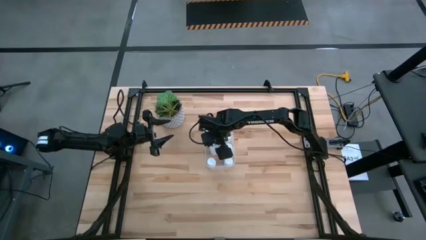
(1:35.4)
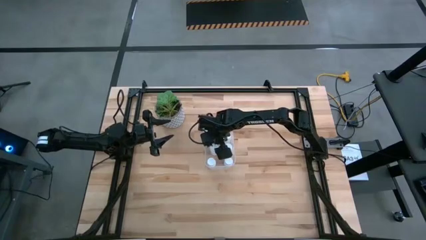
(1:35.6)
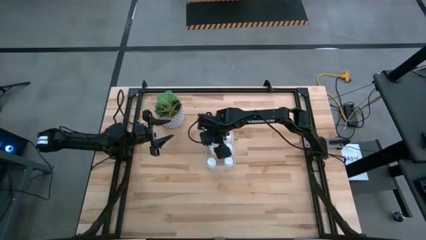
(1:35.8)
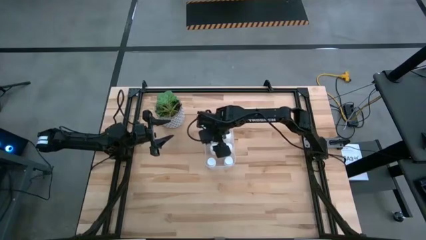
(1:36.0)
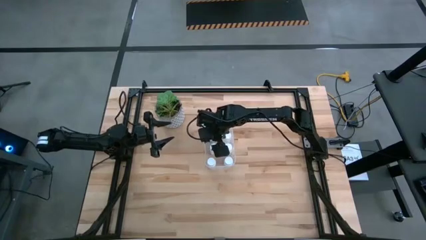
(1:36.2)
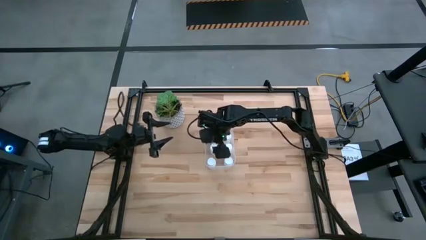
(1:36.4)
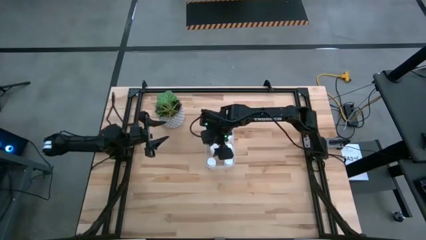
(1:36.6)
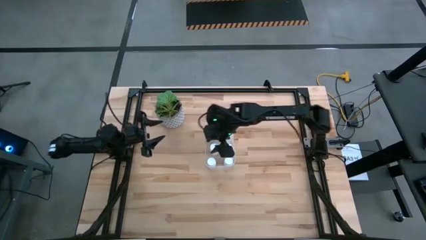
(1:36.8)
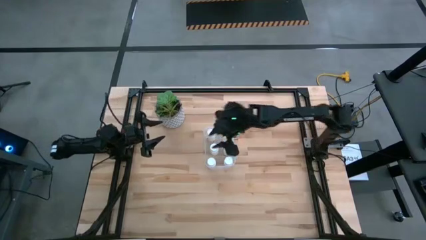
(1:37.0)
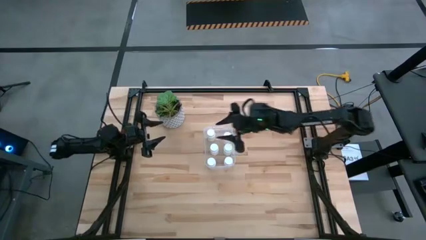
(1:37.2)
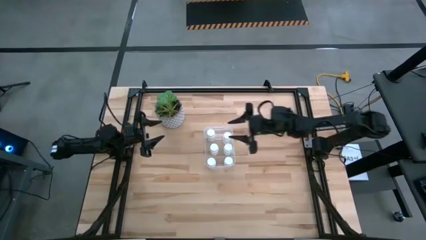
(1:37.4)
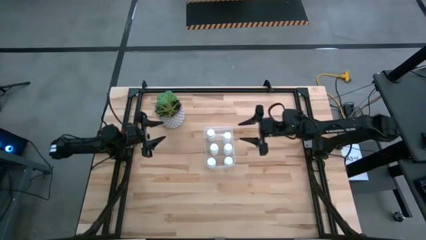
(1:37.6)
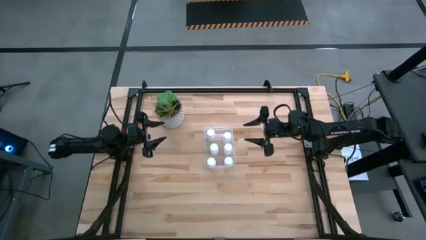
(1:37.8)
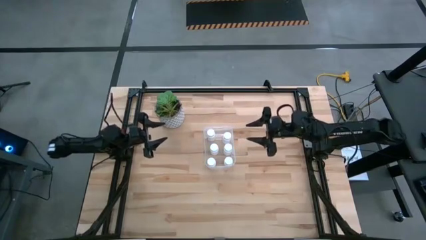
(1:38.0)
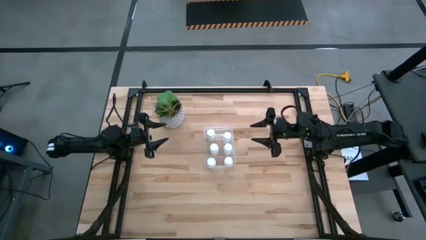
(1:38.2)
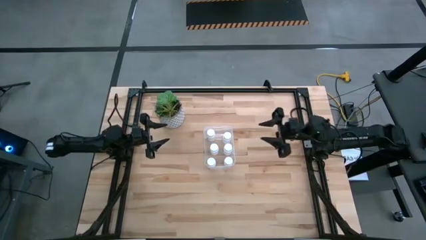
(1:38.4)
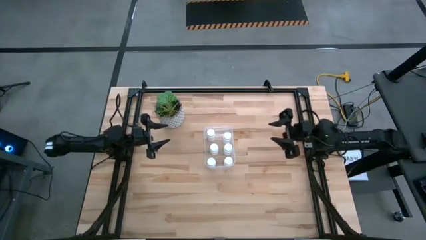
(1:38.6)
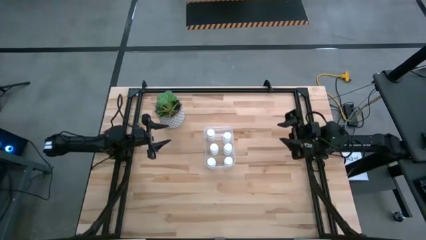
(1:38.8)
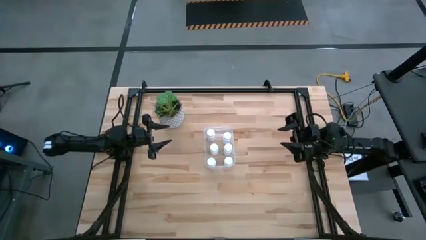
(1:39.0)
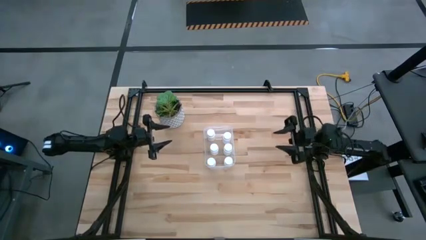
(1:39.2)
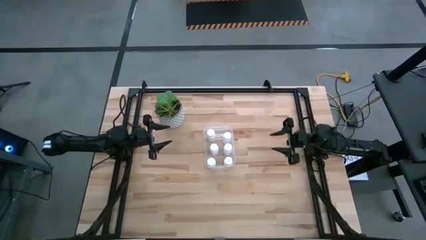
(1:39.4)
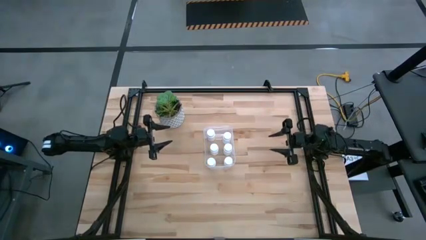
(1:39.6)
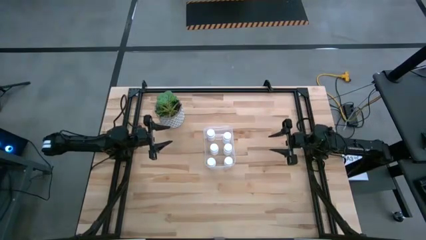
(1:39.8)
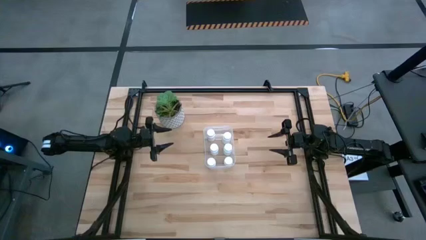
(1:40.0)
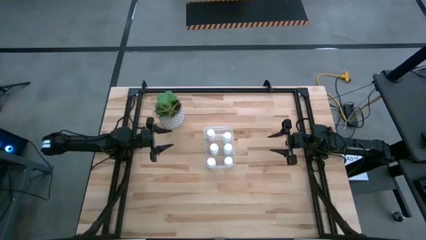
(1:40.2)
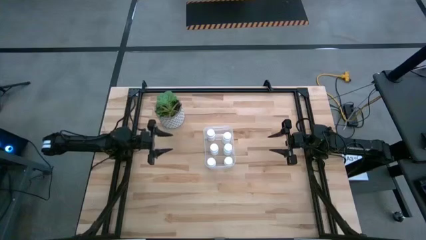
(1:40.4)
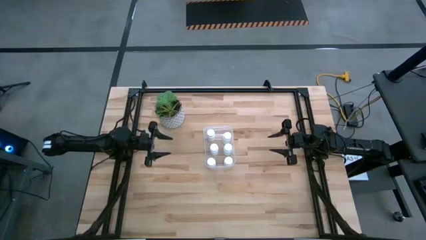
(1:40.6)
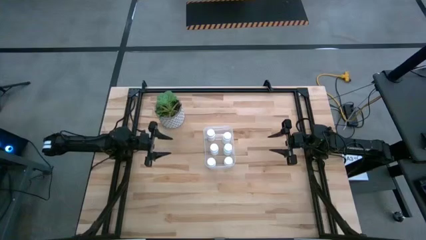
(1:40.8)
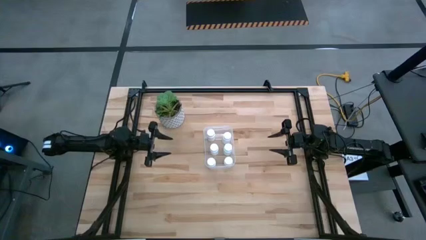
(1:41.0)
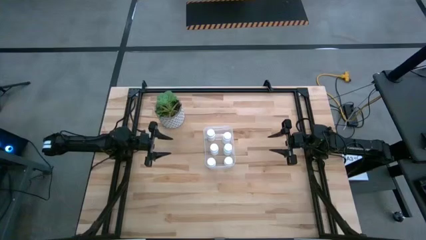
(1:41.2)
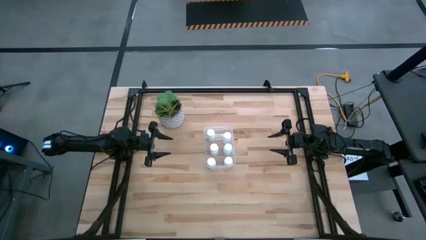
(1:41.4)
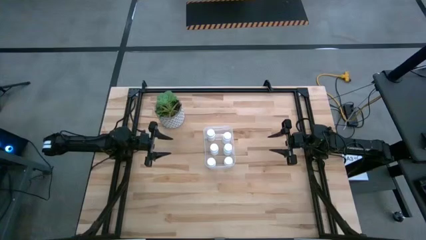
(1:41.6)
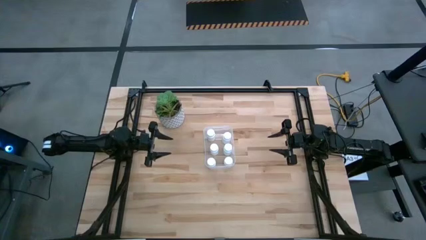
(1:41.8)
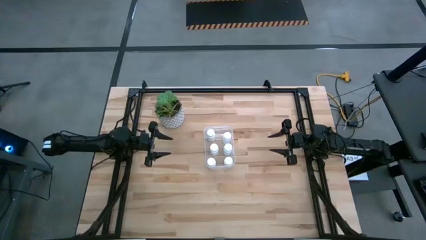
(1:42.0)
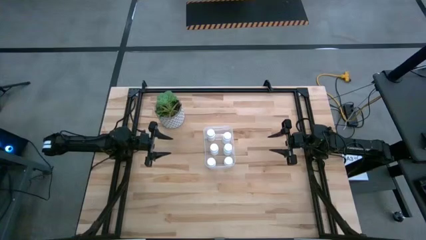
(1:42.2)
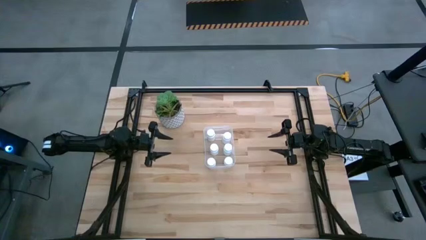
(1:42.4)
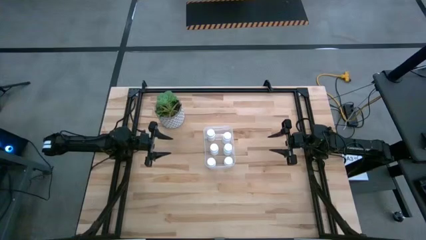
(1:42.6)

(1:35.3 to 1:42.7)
Task: Pick and place pill bottles into a basket
Return to Home Position

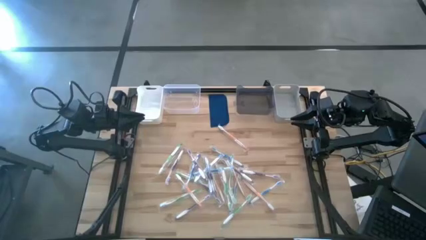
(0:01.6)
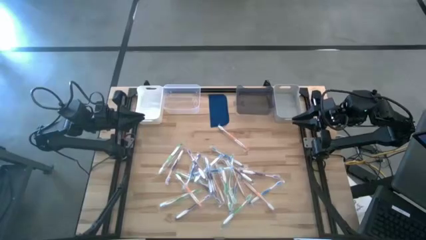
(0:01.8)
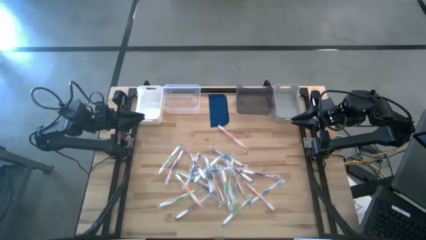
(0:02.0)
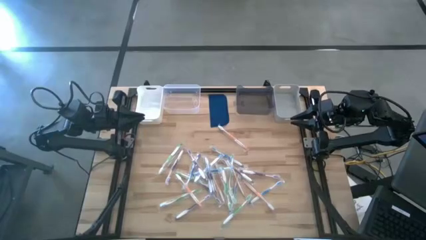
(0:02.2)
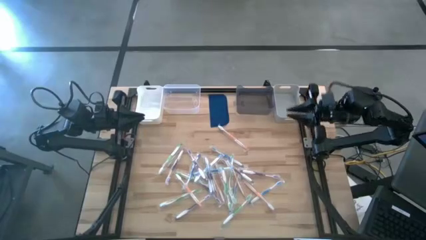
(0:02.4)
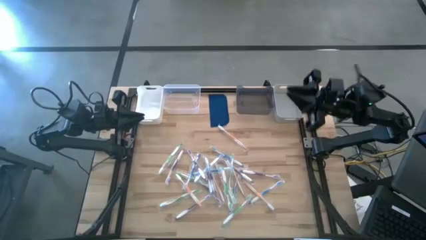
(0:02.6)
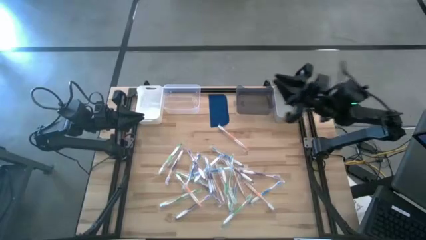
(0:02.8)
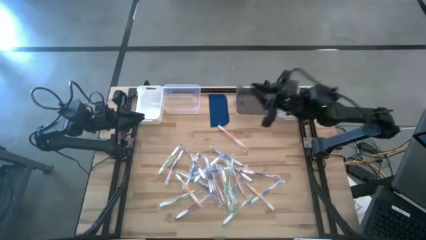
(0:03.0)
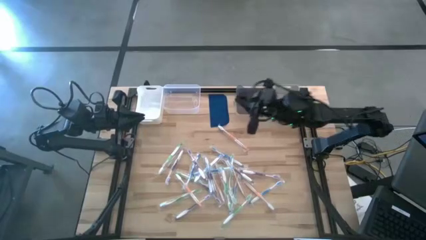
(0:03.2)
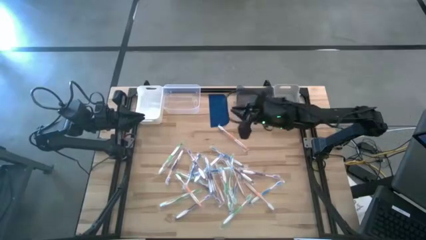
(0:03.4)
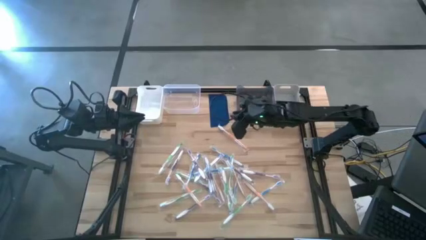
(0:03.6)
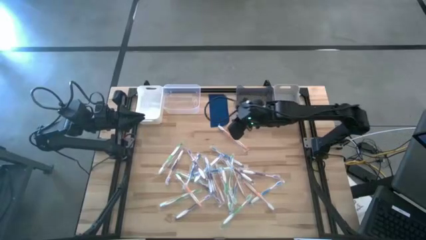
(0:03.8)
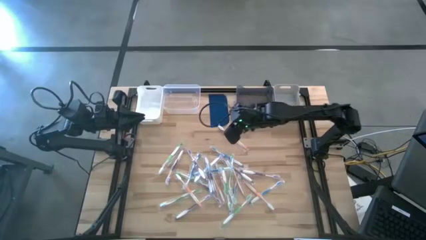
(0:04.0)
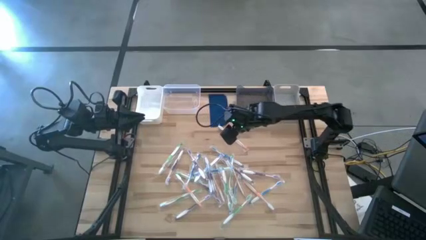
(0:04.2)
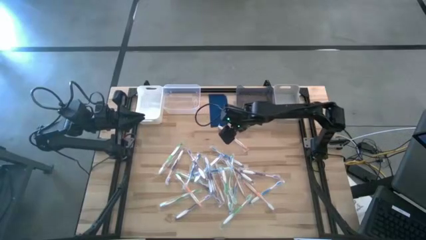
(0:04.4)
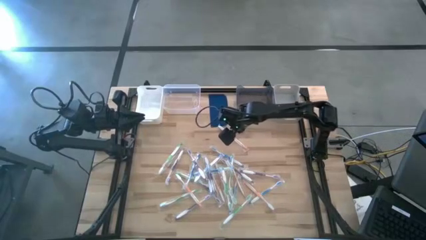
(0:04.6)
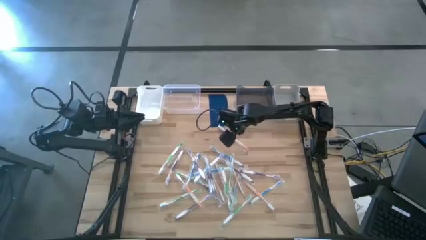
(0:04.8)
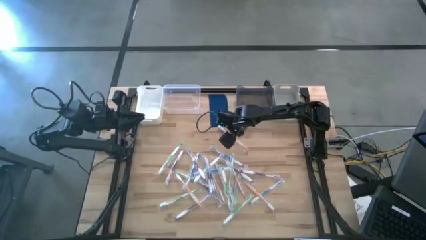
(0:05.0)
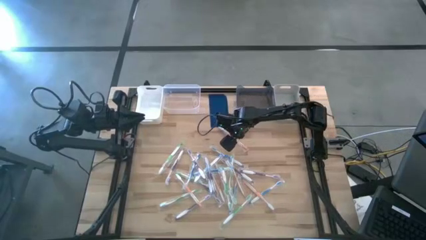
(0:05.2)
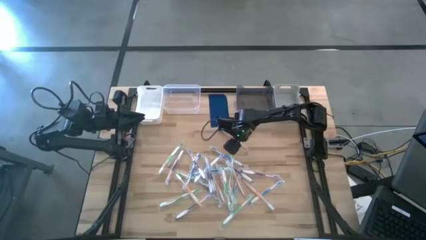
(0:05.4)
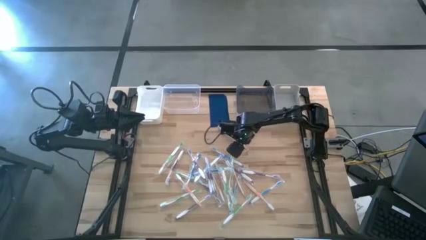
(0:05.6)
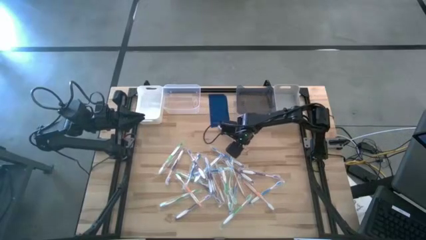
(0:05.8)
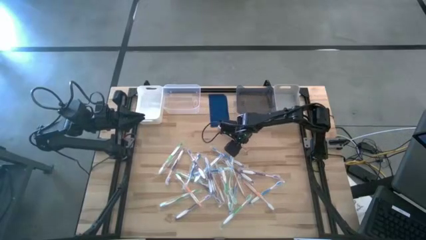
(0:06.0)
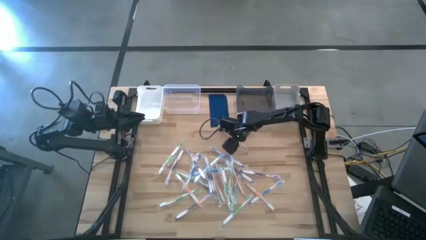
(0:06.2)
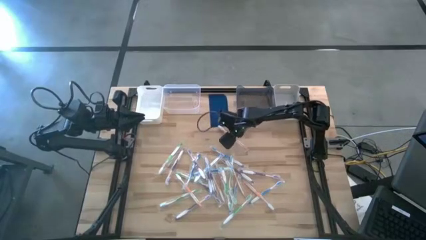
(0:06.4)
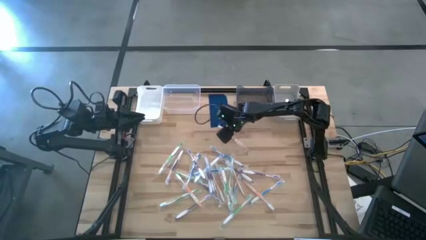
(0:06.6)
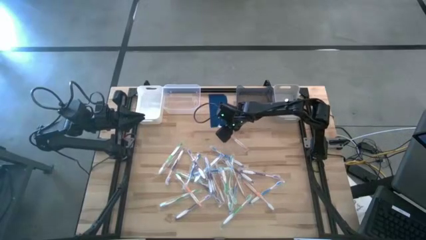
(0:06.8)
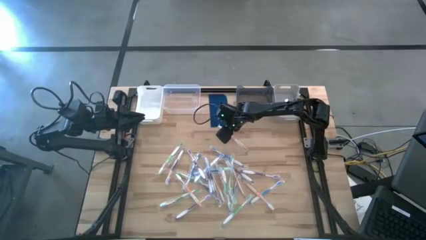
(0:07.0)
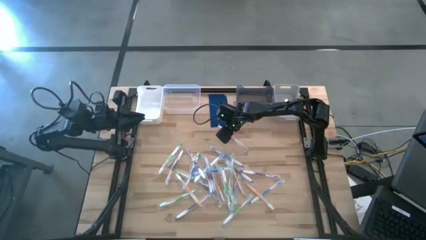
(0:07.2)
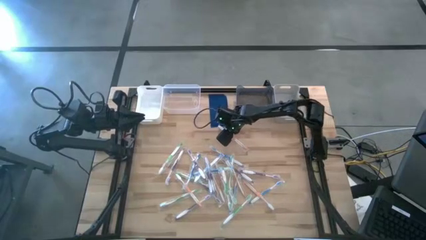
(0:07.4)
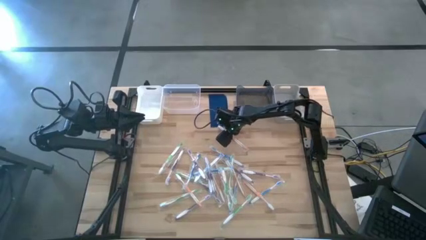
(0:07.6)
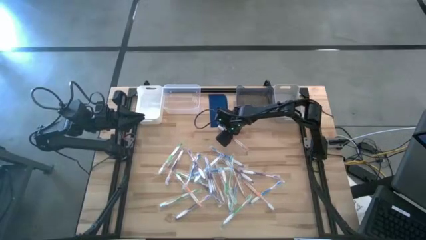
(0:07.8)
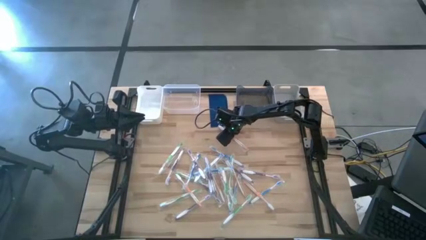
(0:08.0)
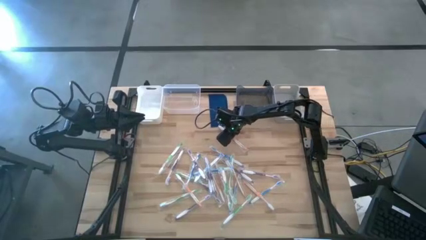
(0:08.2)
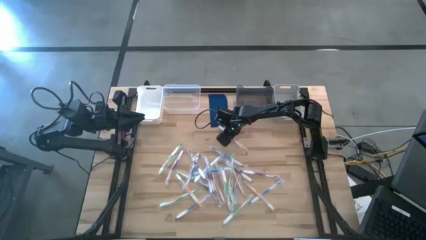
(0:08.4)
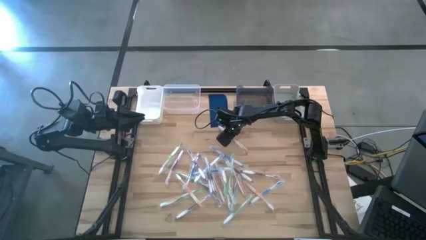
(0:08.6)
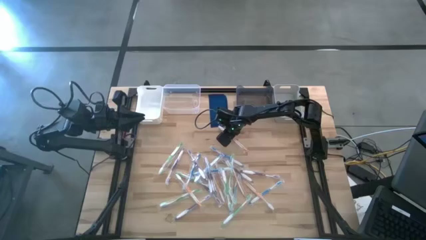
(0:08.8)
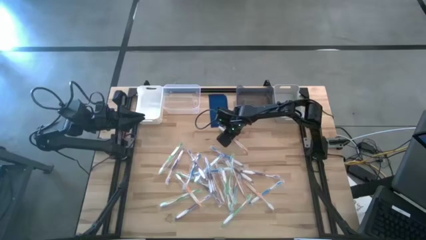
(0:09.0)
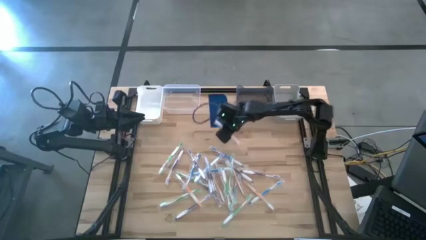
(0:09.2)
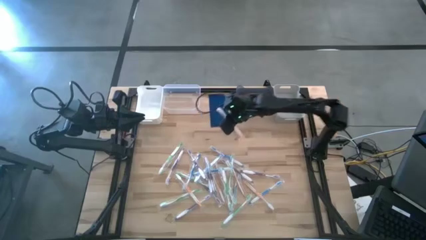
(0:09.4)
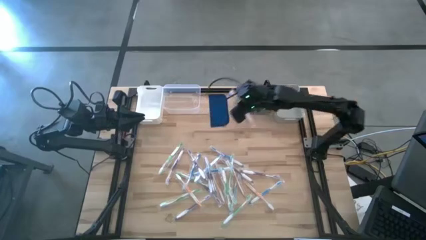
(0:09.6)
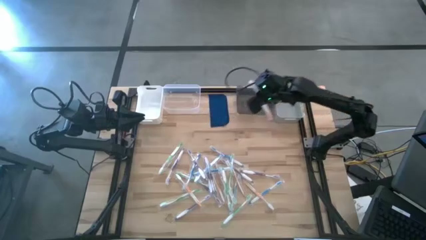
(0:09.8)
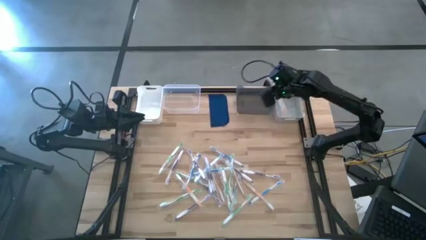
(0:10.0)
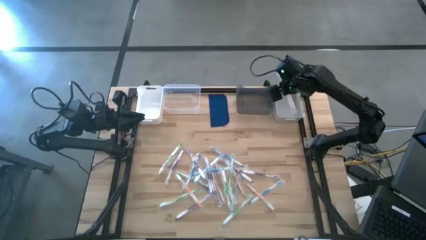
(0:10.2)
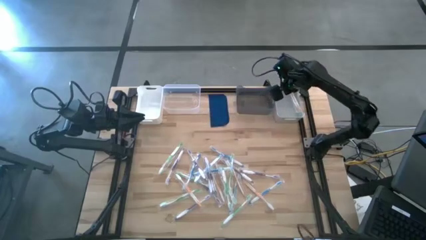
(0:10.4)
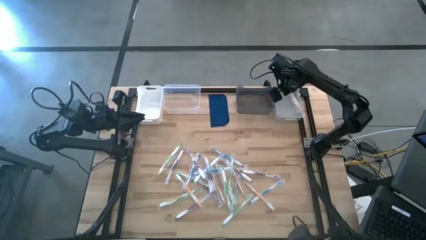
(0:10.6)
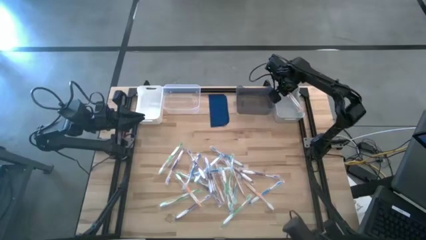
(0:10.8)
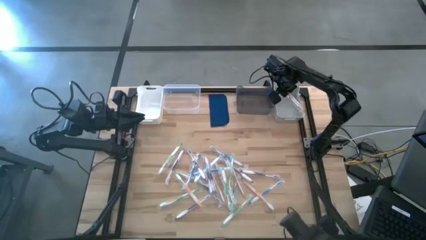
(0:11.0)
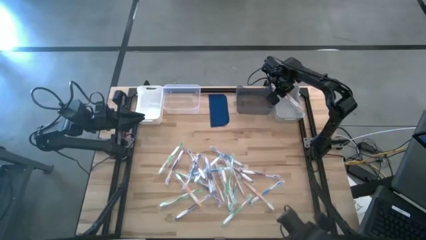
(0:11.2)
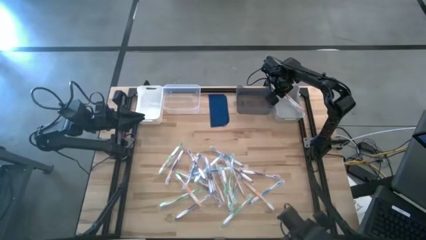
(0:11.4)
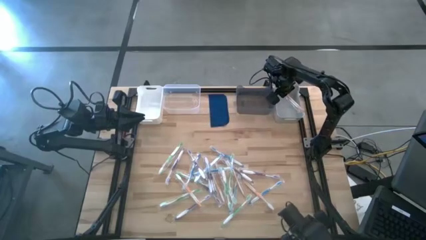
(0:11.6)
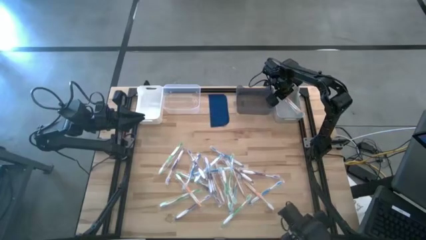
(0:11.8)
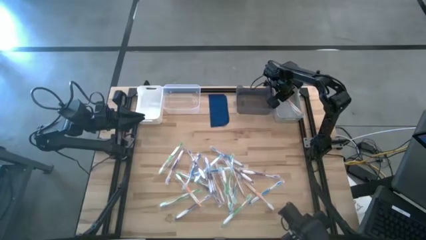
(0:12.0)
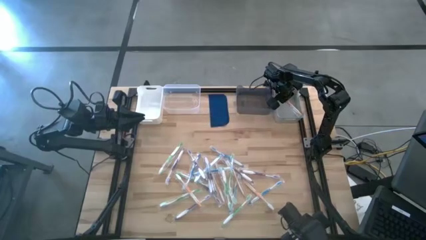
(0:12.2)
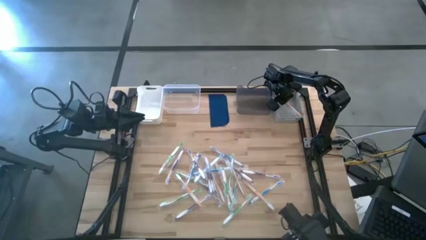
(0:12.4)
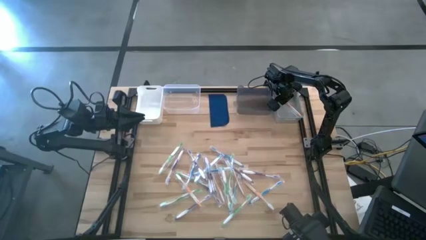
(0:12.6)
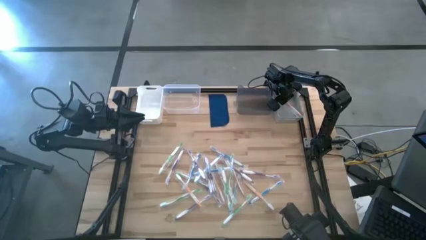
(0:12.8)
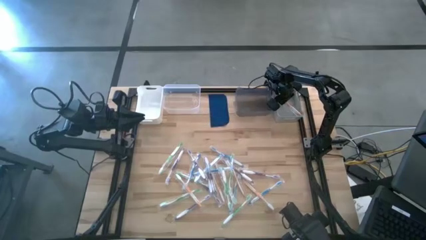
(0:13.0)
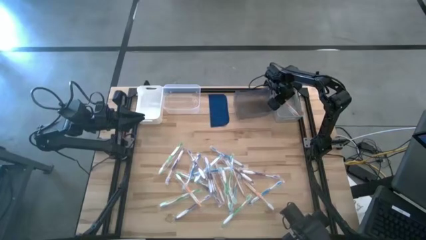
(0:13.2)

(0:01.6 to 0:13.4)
Task: Pick & Place Toothbrushes
Put the orange toothbrush into the gray bin
